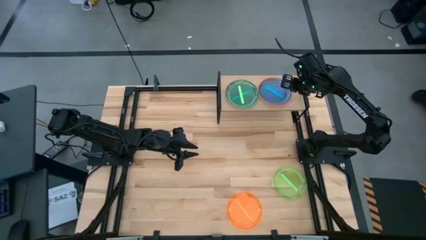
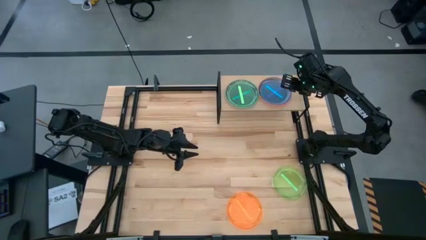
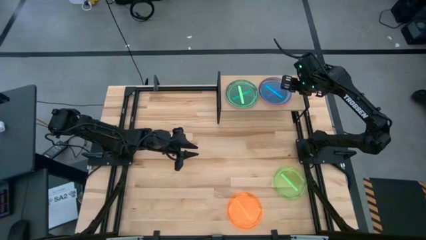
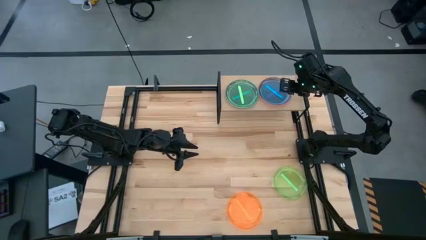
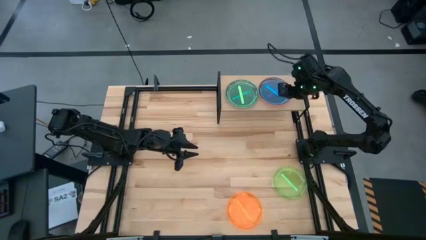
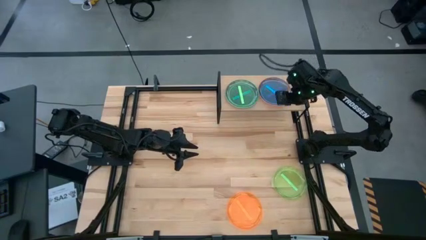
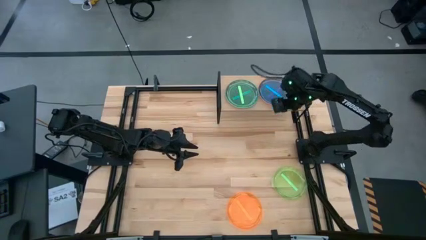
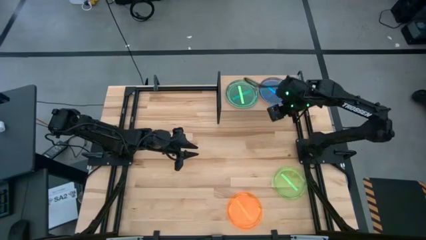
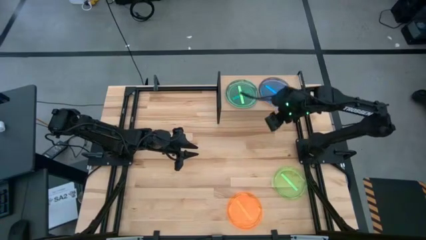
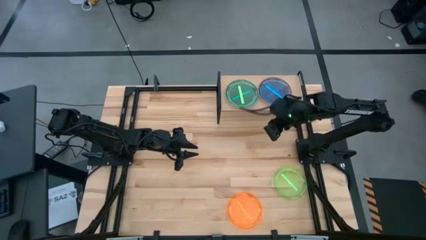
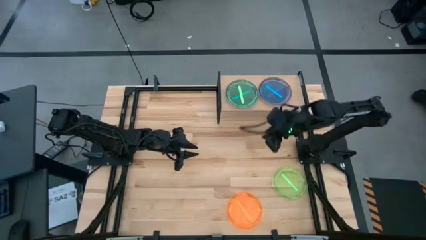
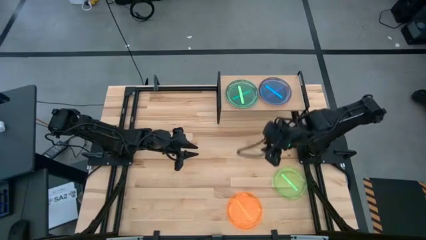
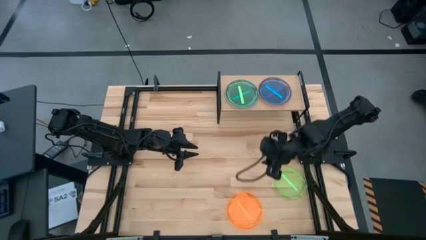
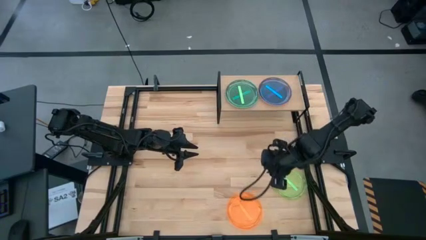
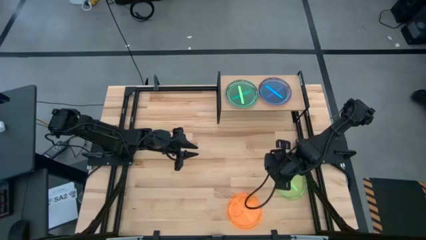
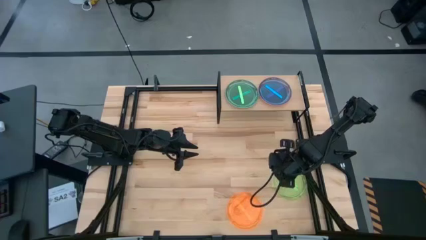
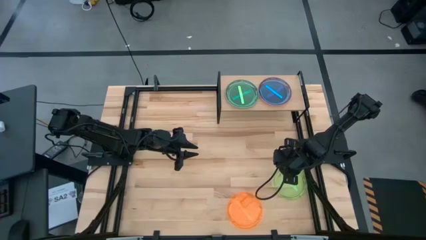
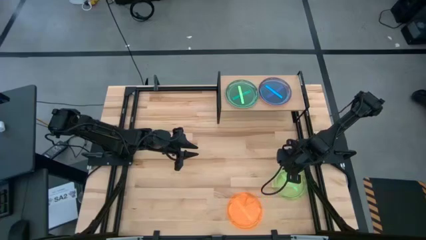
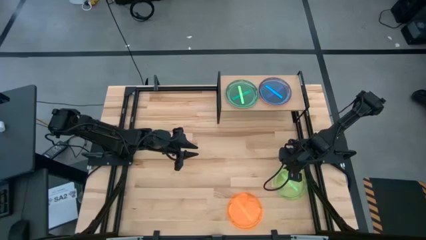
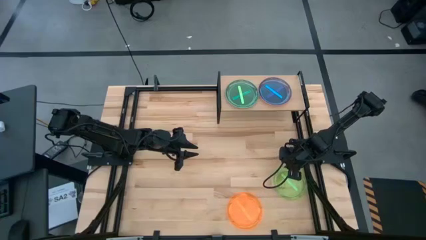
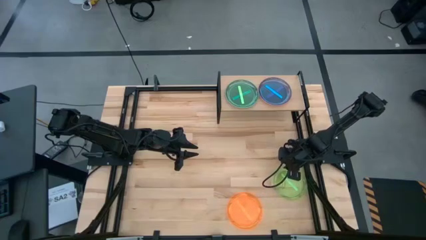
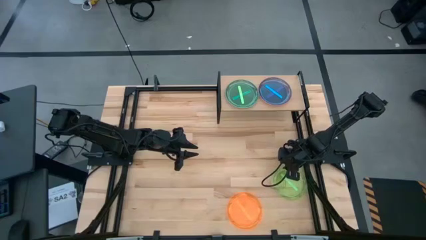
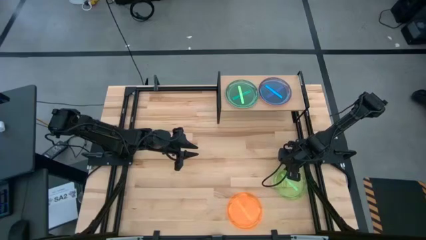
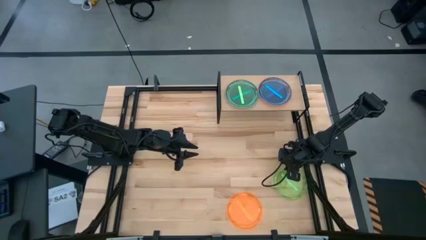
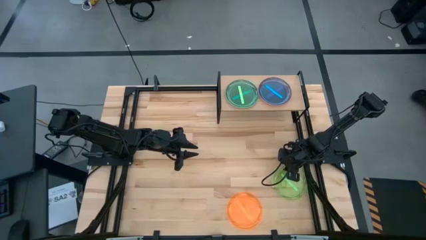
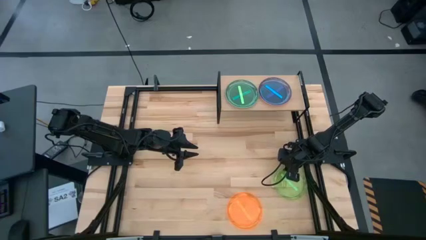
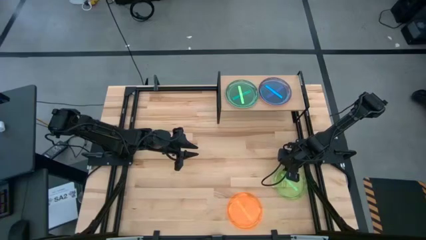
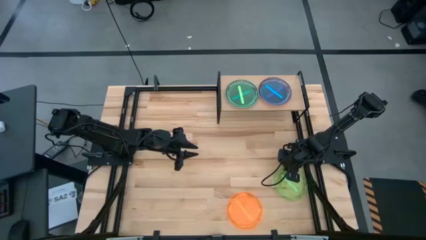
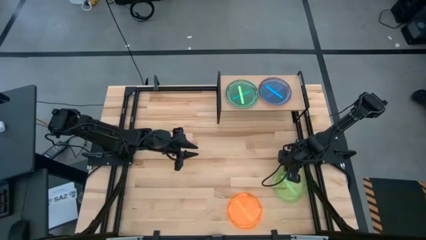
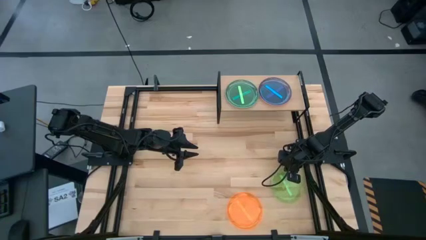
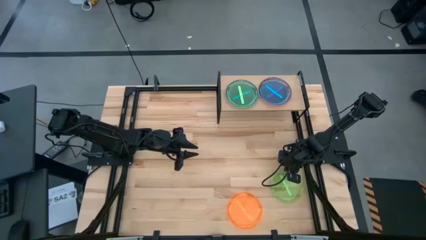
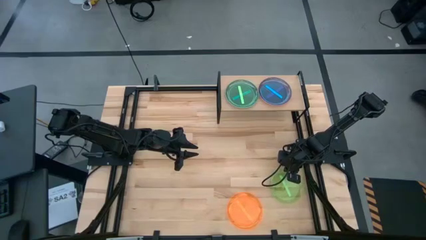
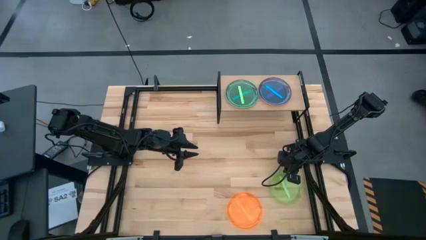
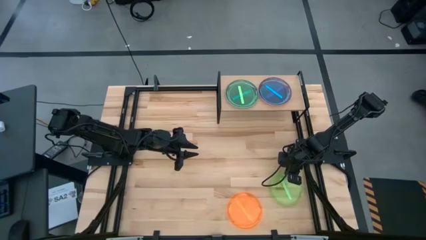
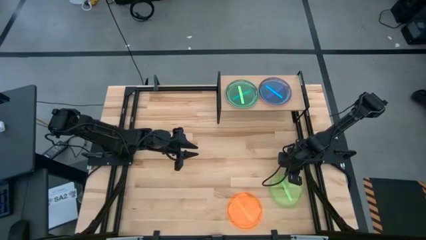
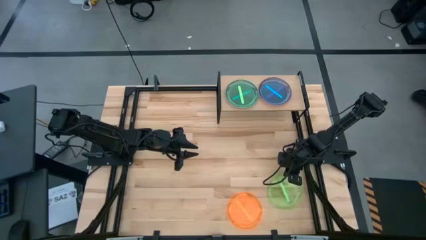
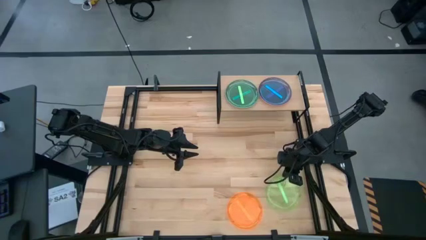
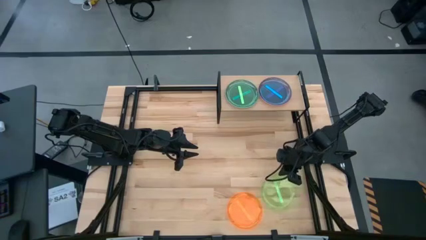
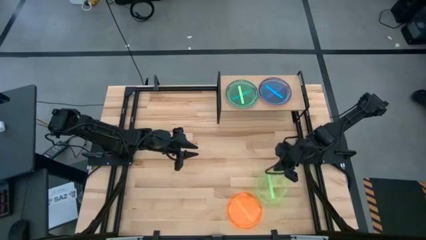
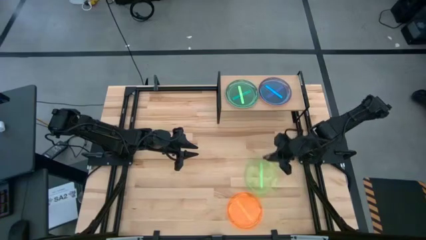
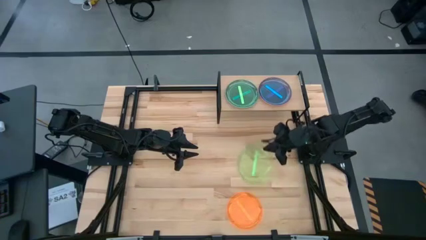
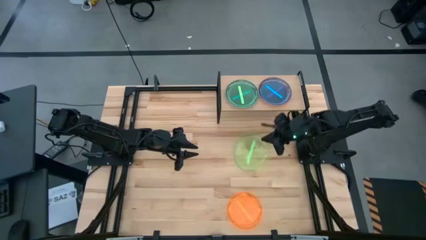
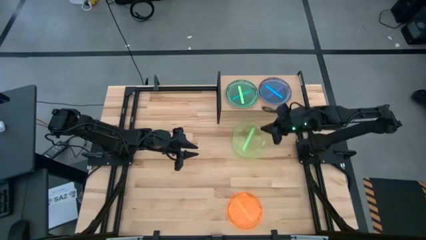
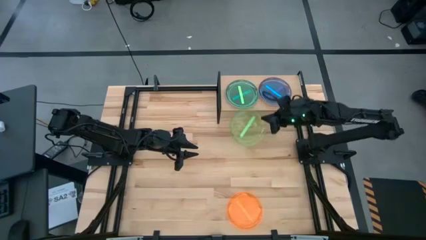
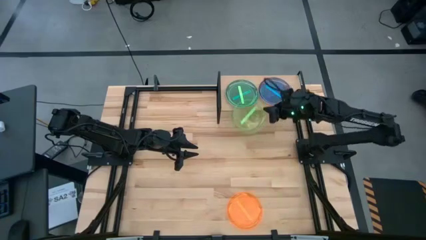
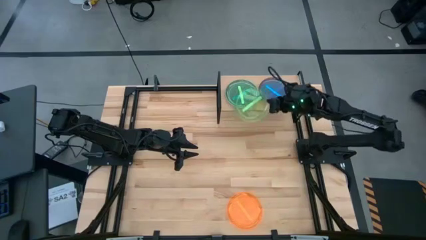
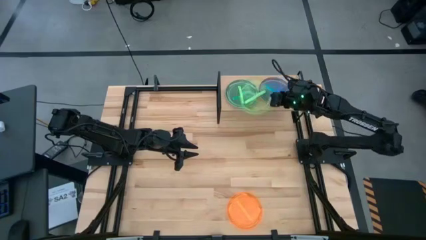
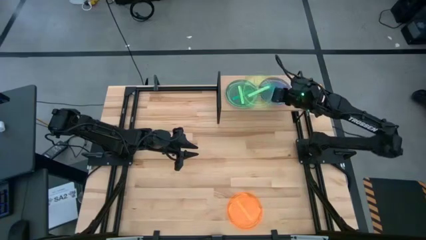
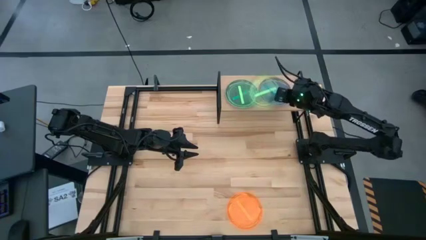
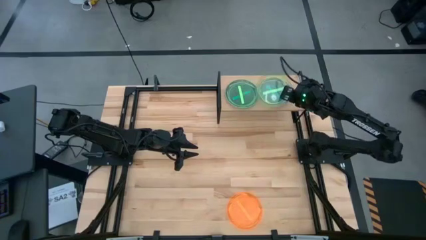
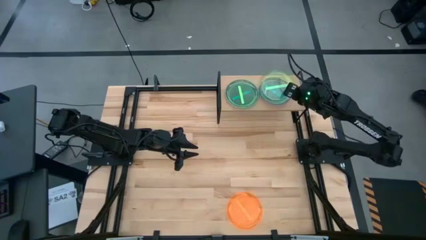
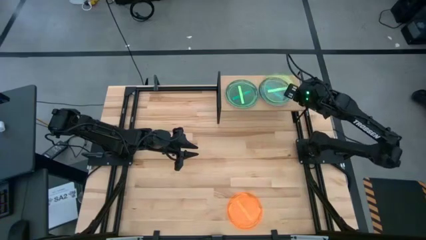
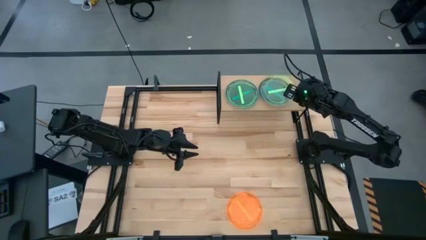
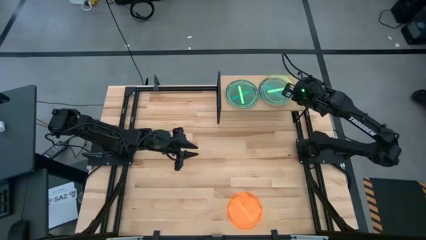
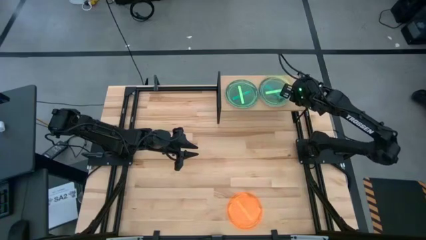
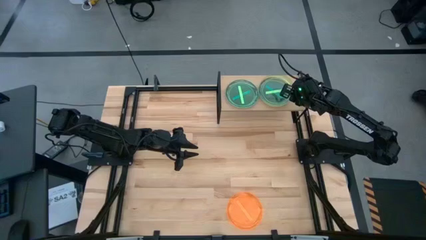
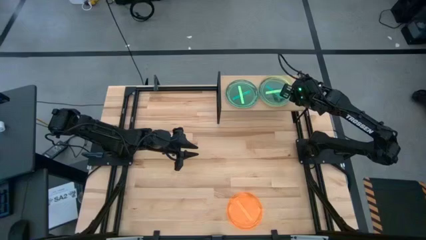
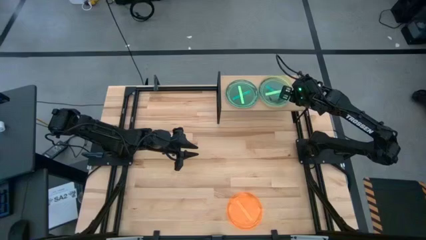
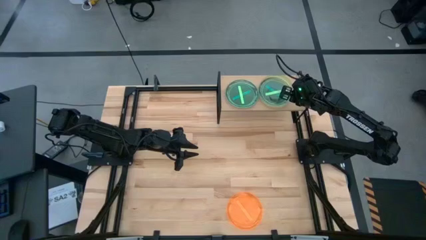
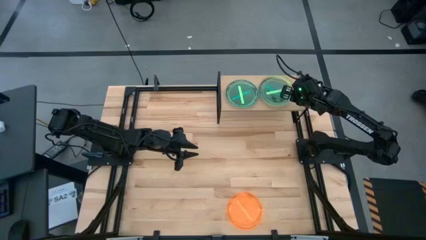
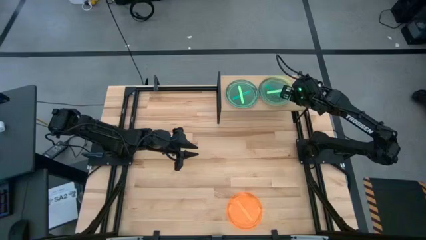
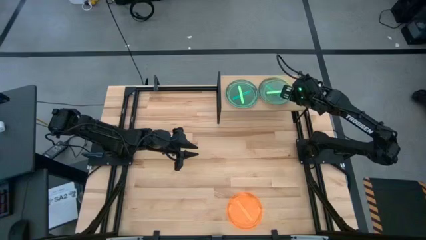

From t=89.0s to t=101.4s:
Task: Place and stack plates onto a shelf
Stack the green plate on top of the blue plate on the shelf
